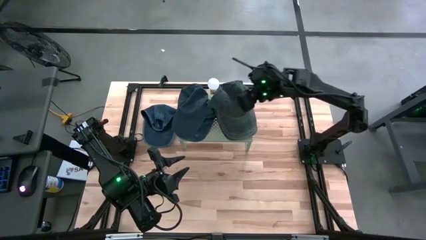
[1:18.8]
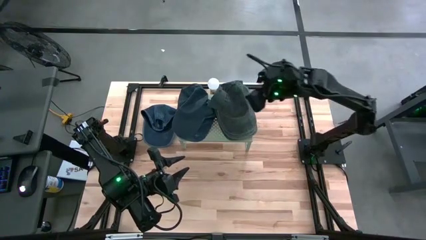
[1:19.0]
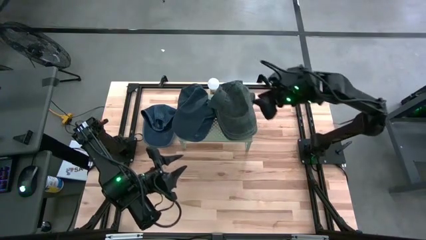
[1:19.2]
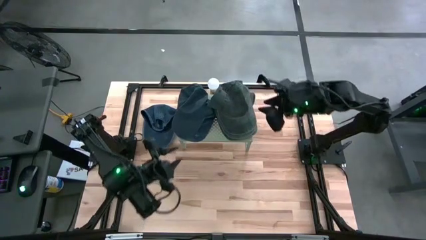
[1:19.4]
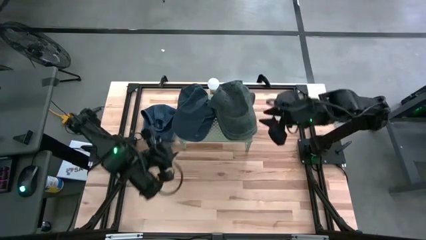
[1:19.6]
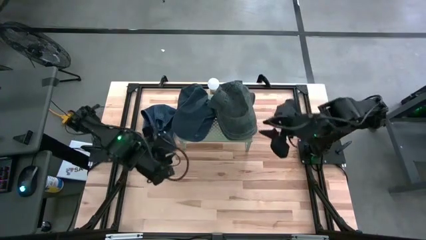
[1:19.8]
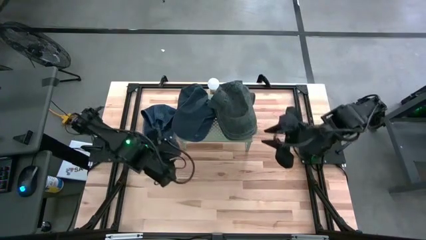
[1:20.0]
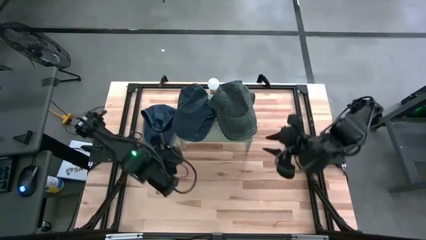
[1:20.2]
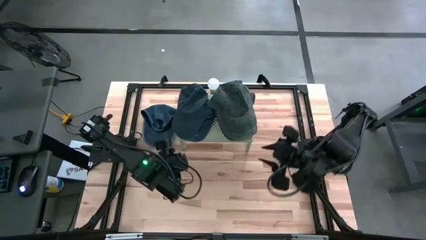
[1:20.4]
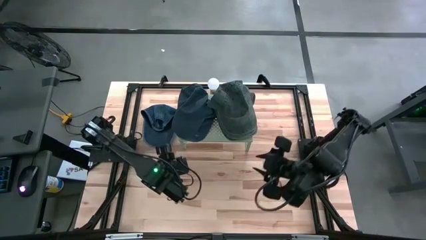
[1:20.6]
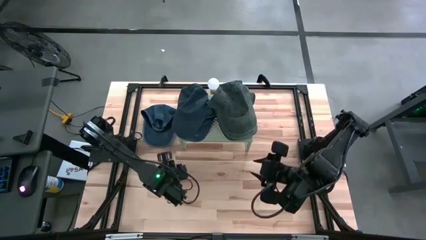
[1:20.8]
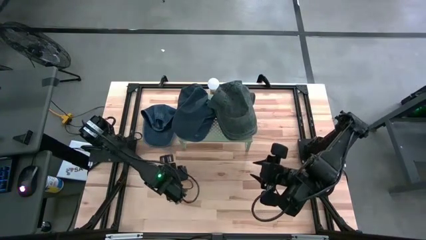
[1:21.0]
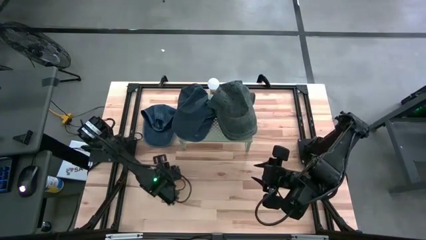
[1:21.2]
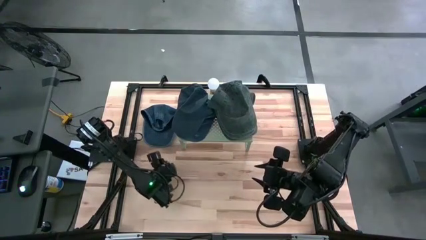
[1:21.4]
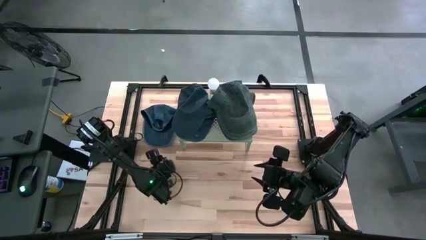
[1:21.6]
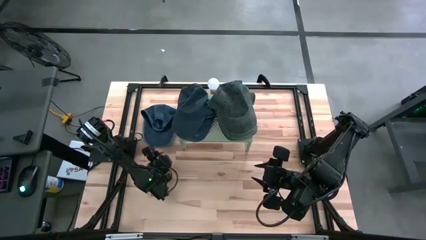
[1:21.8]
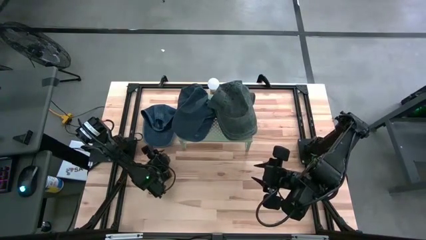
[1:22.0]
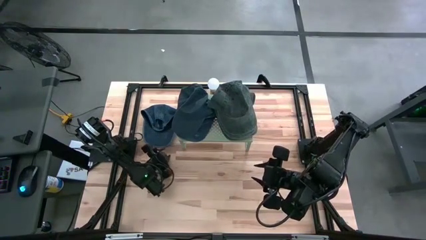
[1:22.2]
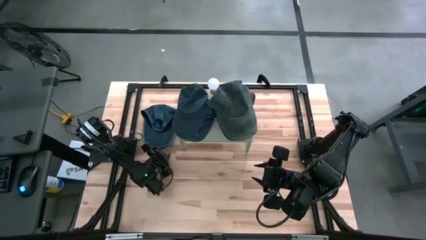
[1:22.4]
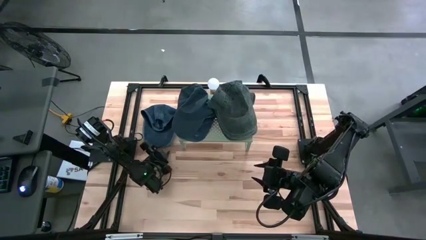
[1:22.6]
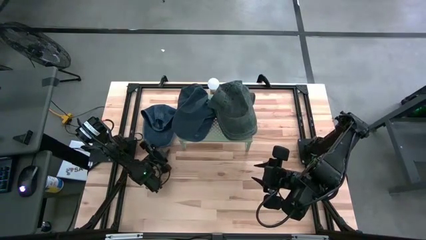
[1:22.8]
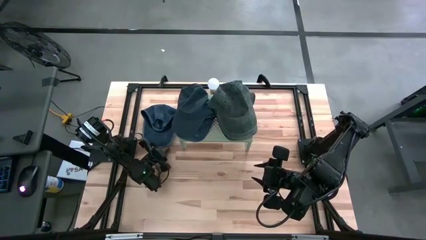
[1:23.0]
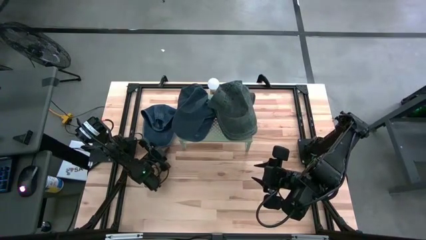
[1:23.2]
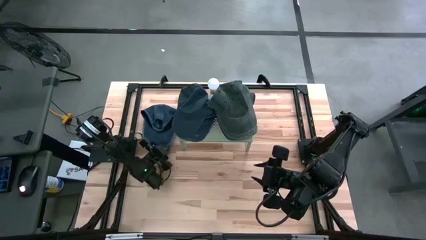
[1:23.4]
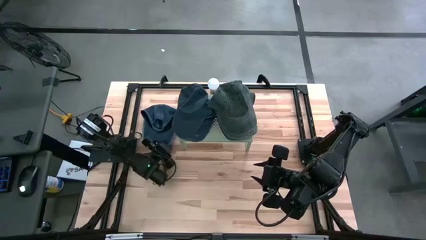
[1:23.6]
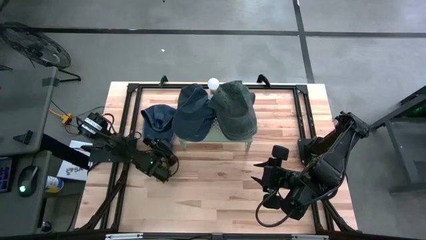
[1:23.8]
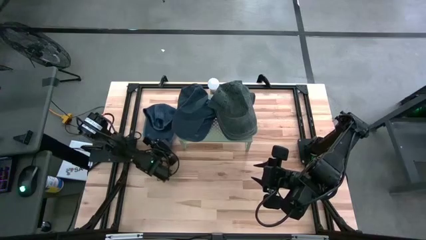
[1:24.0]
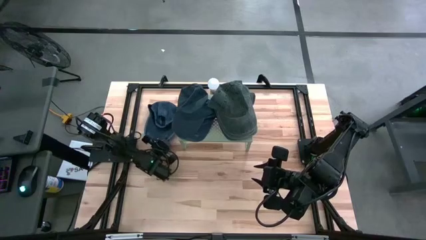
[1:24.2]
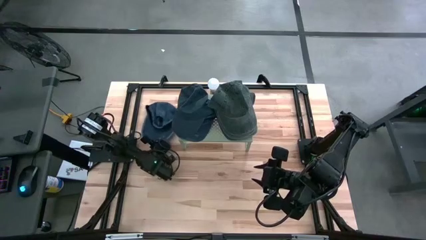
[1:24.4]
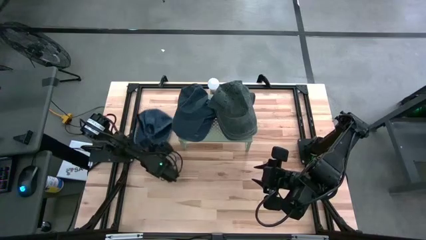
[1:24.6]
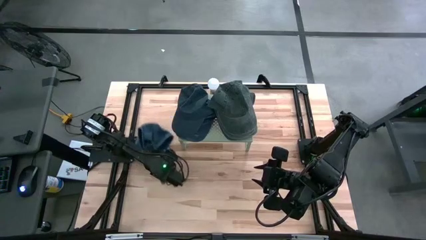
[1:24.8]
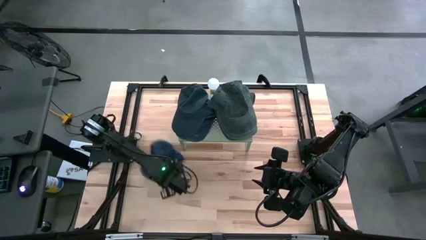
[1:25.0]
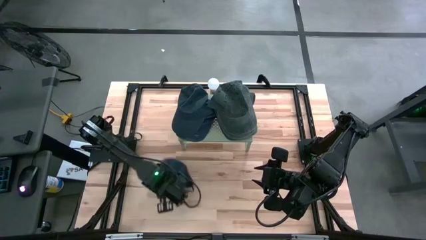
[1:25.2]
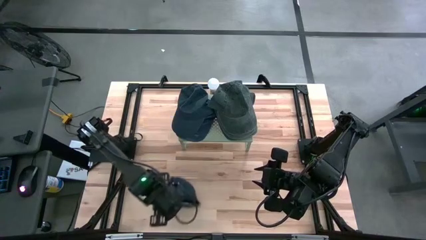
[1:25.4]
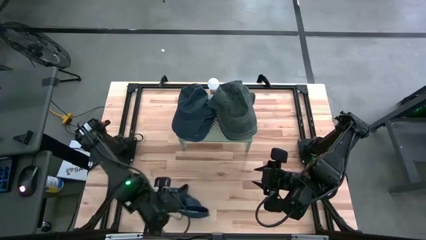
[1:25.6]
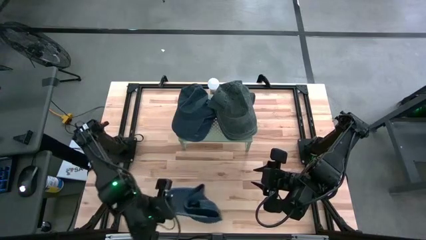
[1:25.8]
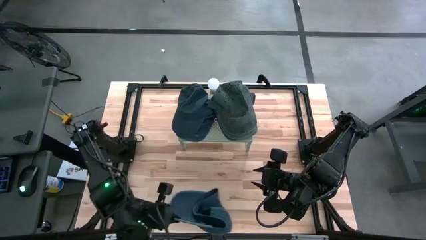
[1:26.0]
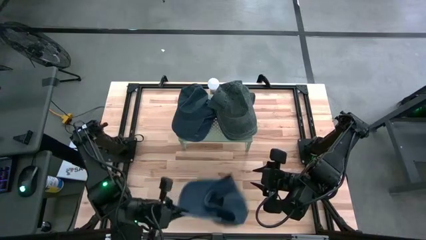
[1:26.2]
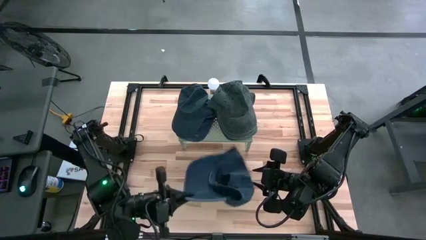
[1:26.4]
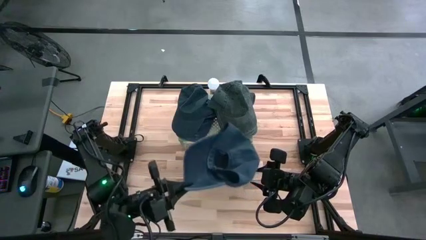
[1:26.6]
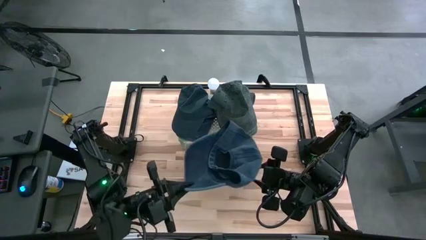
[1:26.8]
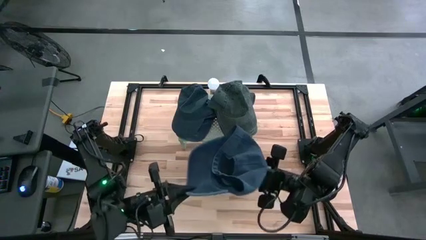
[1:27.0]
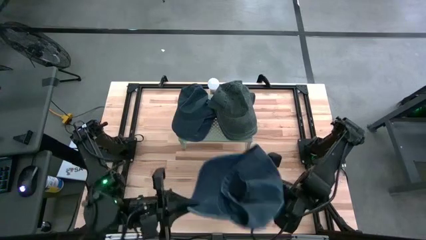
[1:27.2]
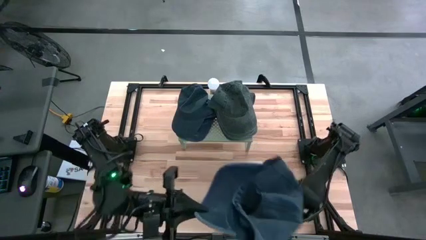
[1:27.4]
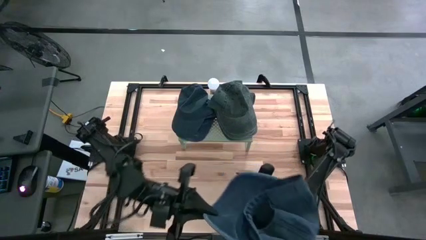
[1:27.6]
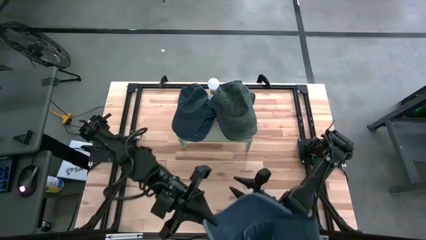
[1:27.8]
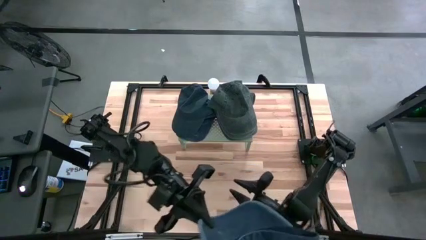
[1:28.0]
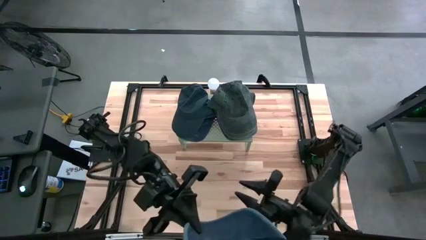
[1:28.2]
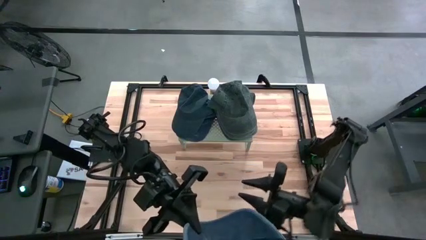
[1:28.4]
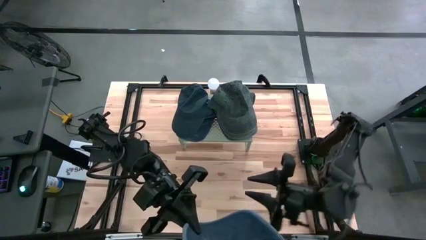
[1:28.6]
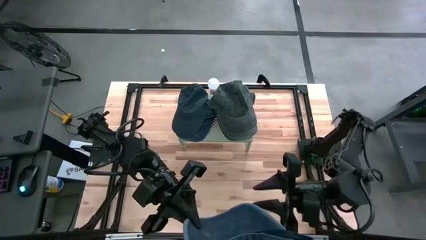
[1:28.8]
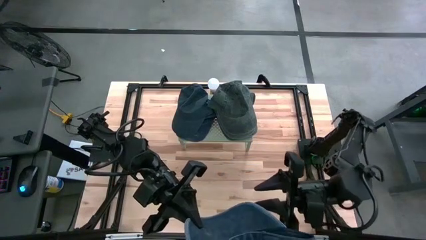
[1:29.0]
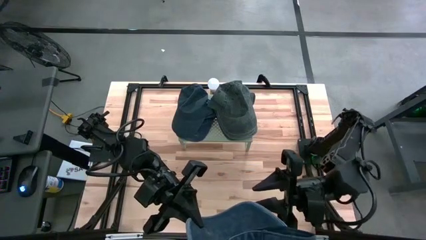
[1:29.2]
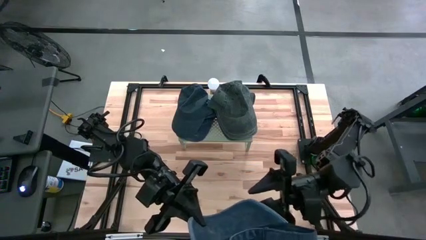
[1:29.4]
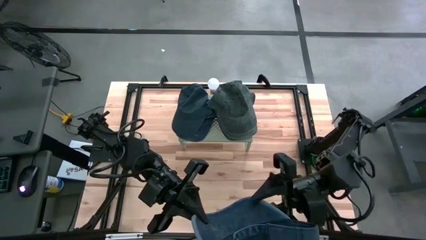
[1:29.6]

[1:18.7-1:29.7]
Task: Pick & Place hat
Stack the dark blue cap on the top of the dark blue cap on the shelf

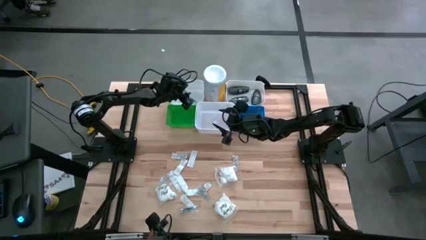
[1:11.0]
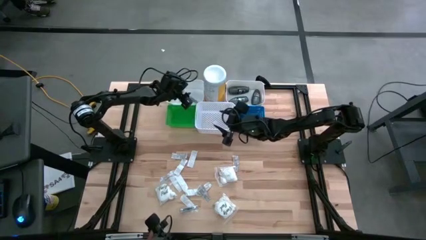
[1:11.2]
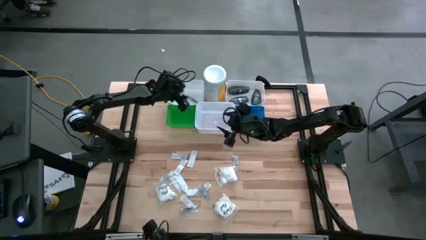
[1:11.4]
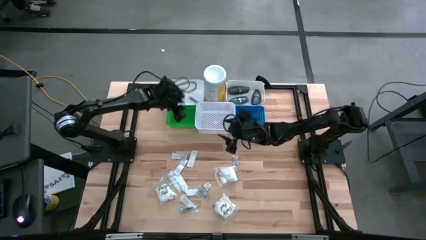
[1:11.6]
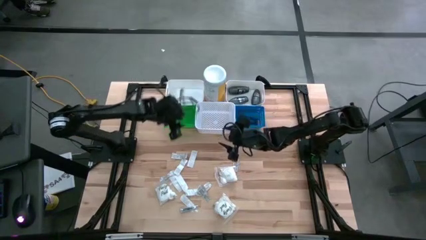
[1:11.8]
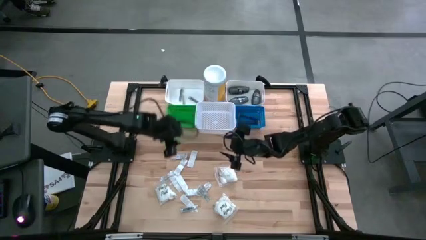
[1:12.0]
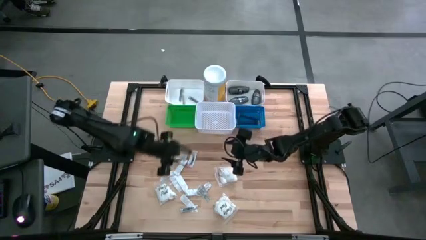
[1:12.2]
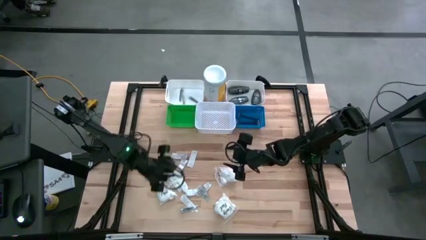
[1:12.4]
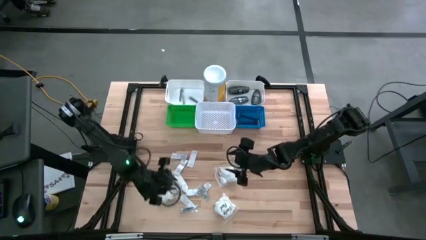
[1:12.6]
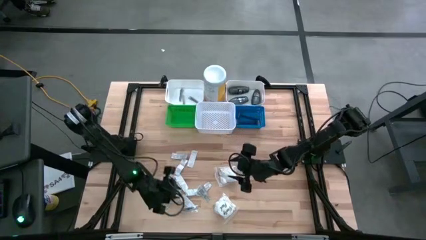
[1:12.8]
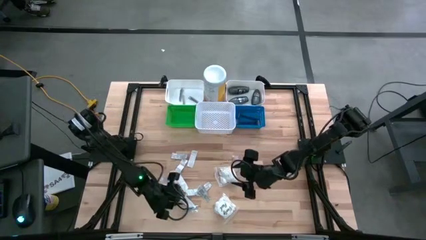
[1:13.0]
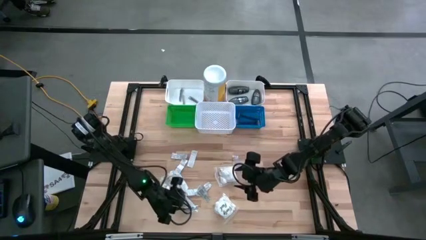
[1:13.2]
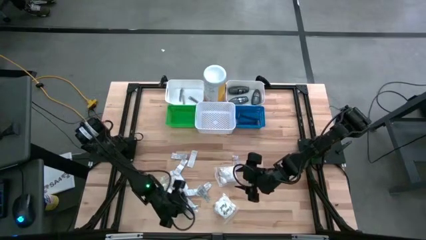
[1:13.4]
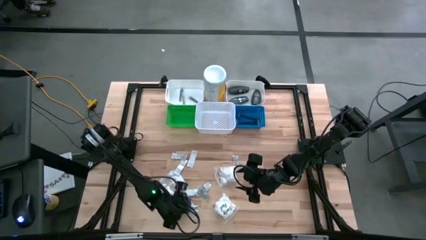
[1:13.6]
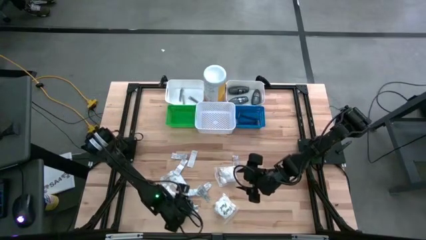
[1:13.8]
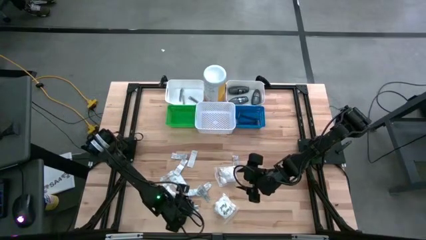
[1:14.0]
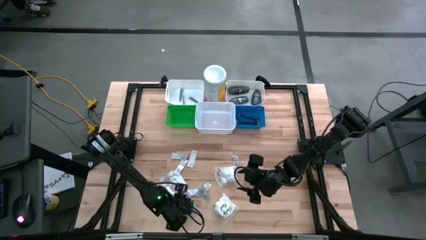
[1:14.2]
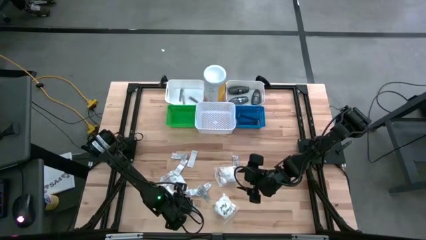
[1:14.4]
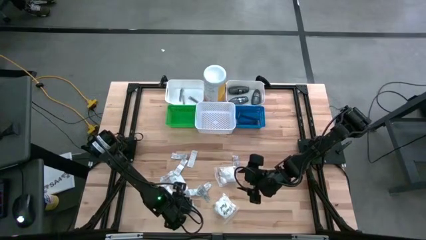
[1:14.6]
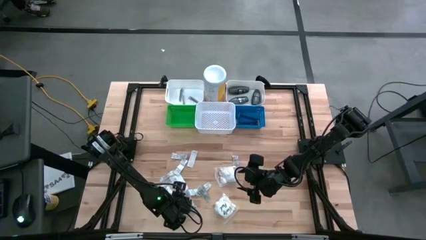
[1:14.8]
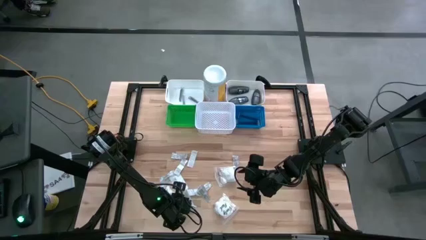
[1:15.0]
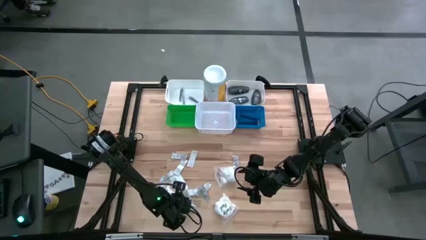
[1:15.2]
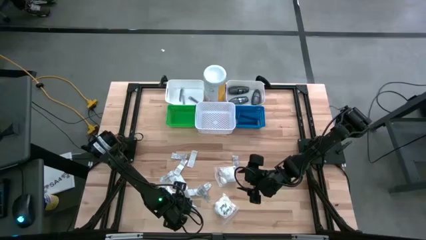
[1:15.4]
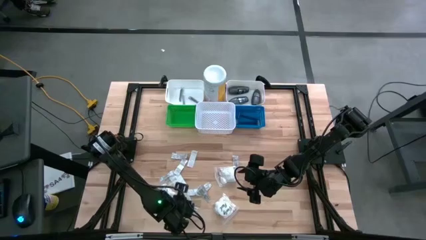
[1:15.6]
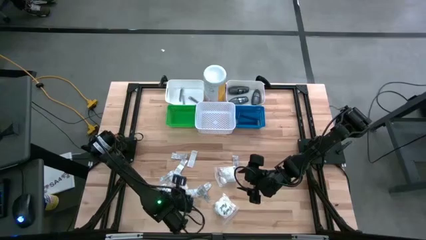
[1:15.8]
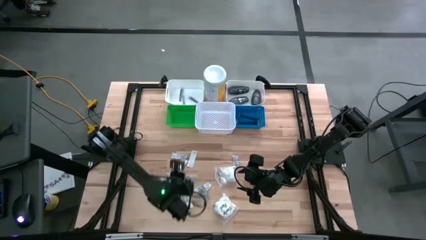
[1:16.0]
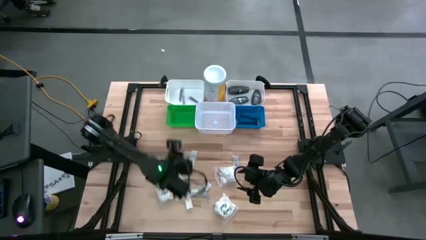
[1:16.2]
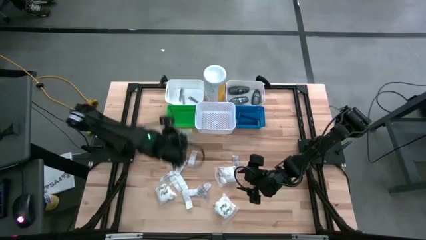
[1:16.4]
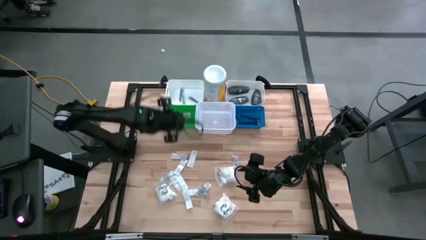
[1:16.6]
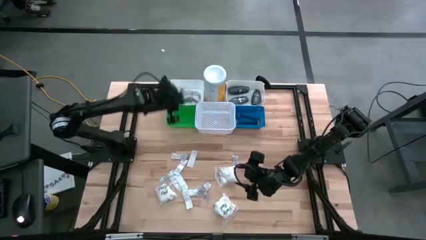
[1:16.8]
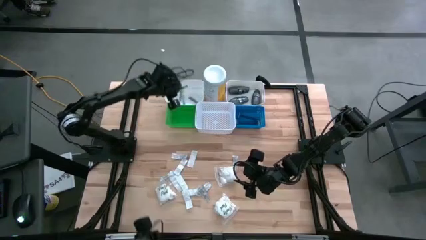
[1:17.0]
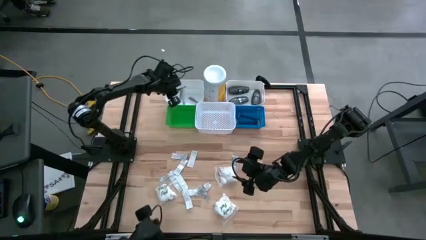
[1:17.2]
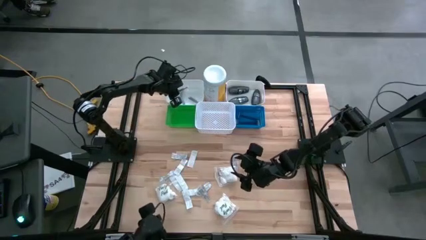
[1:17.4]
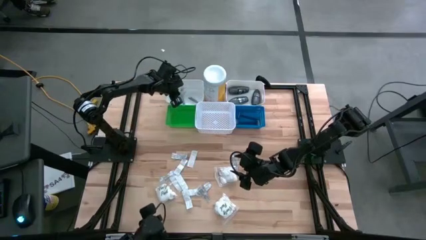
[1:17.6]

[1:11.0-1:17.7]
Task: Pick & Place Travel size toiletries
Put the silver nail cutter into the top left white bin
